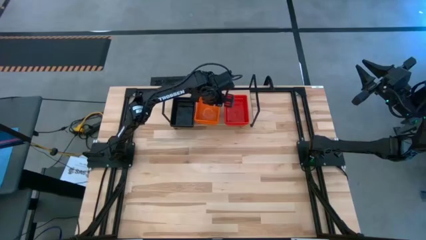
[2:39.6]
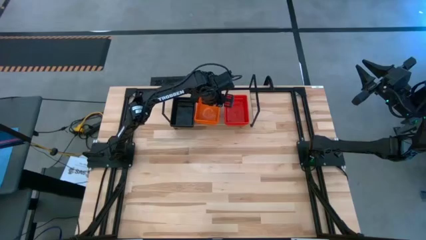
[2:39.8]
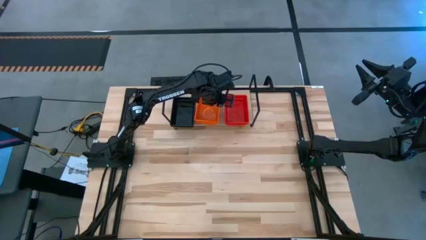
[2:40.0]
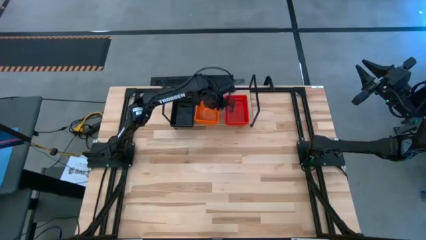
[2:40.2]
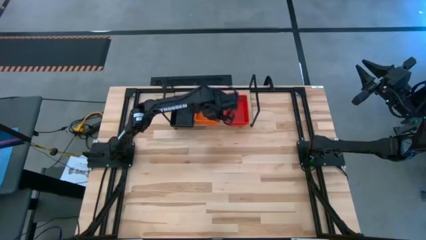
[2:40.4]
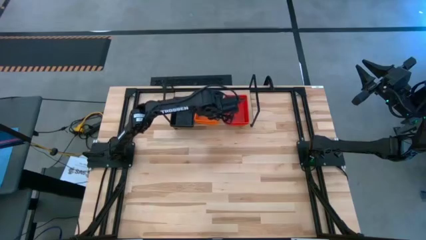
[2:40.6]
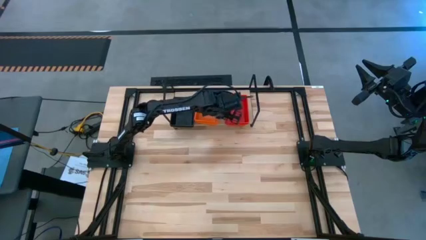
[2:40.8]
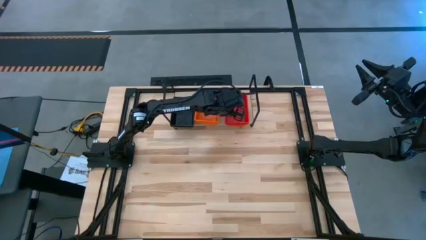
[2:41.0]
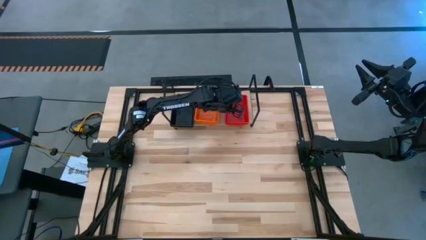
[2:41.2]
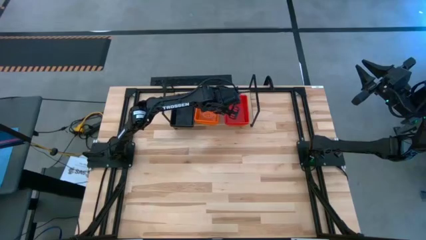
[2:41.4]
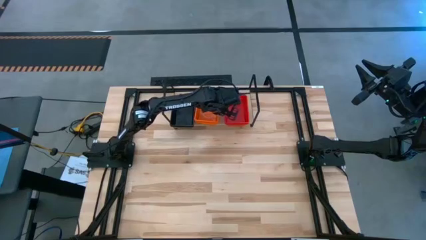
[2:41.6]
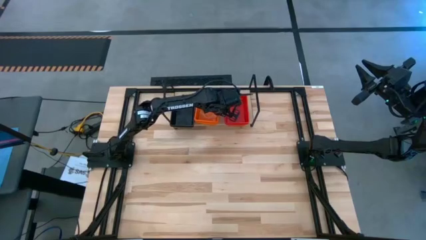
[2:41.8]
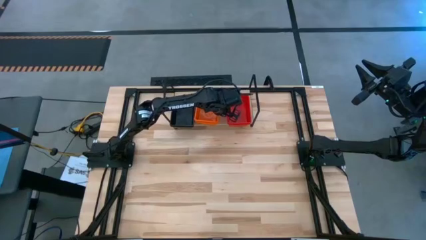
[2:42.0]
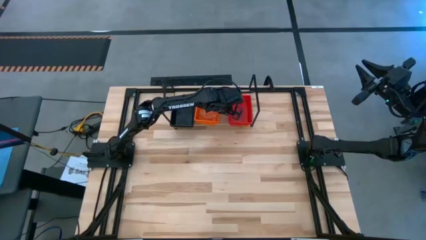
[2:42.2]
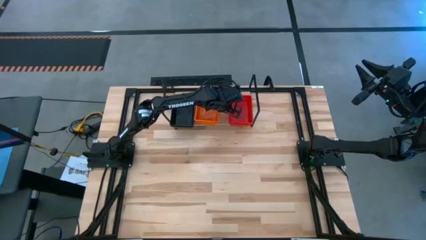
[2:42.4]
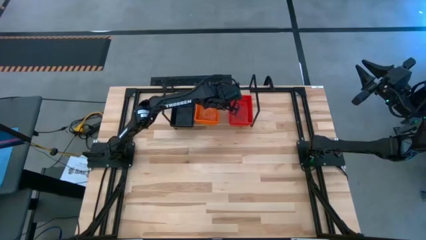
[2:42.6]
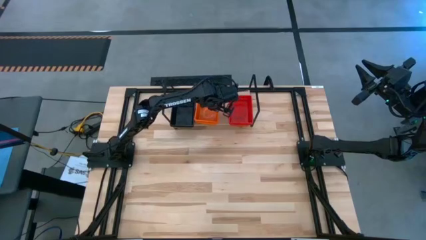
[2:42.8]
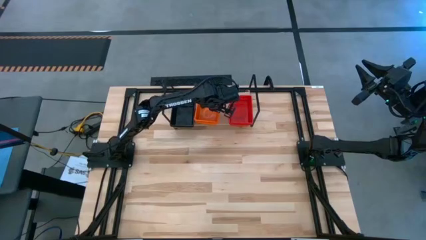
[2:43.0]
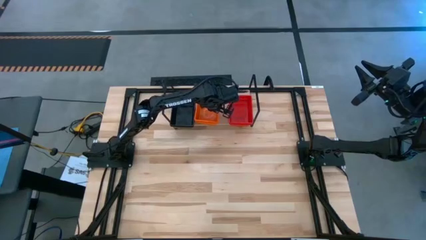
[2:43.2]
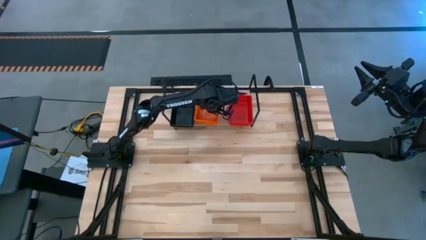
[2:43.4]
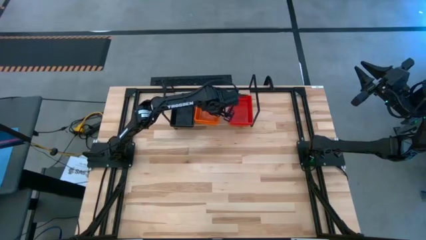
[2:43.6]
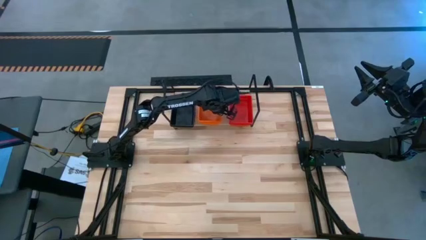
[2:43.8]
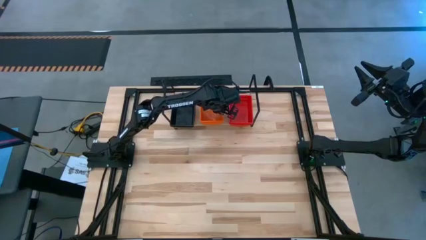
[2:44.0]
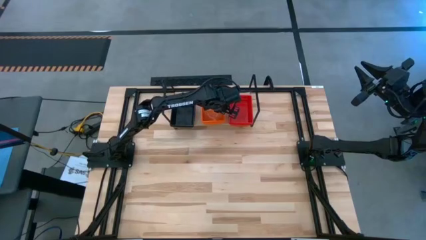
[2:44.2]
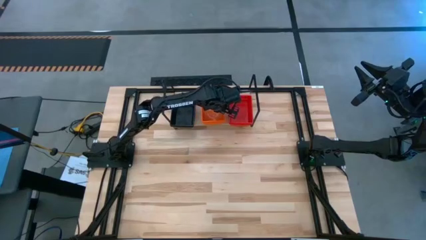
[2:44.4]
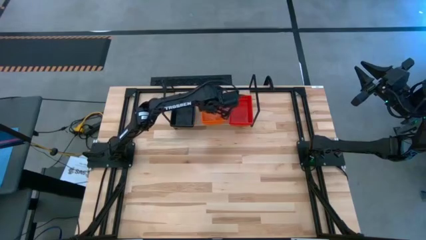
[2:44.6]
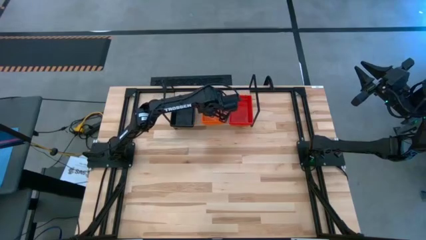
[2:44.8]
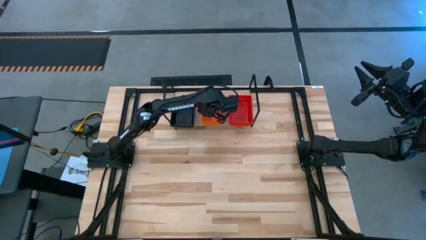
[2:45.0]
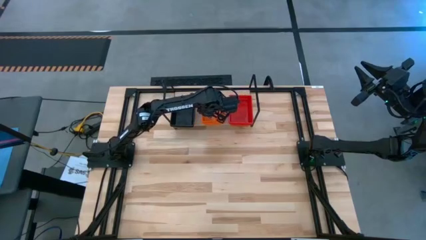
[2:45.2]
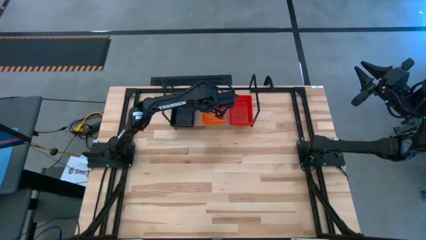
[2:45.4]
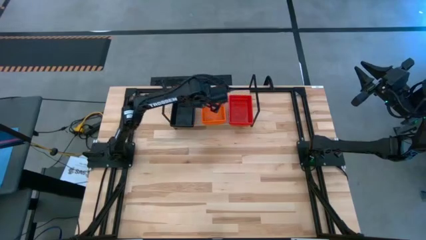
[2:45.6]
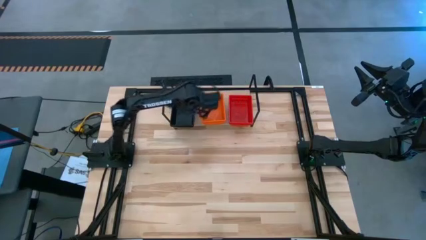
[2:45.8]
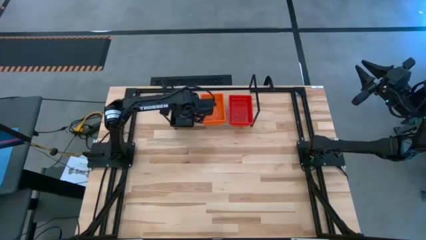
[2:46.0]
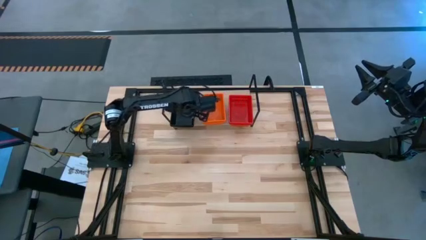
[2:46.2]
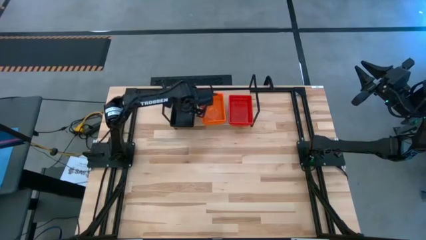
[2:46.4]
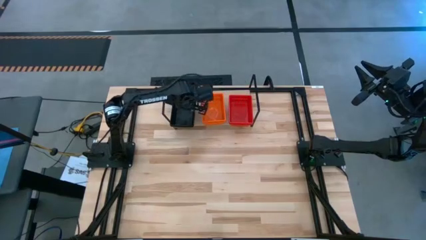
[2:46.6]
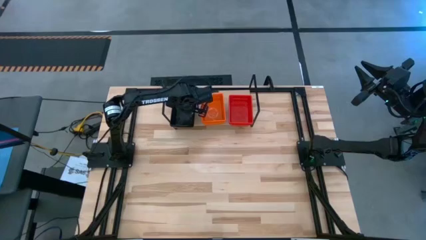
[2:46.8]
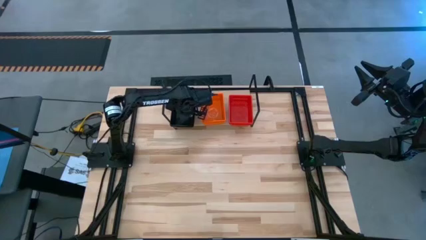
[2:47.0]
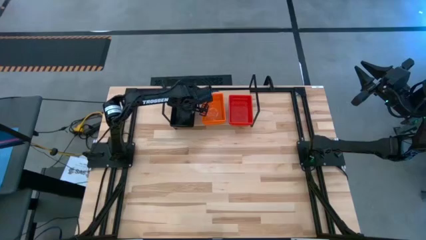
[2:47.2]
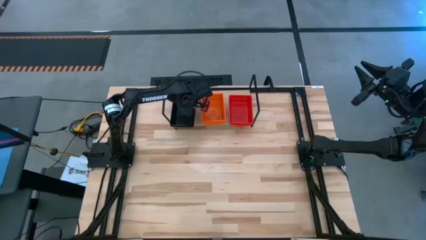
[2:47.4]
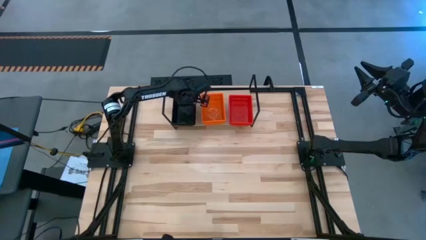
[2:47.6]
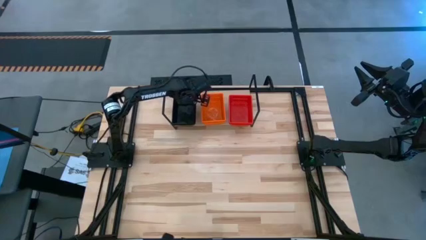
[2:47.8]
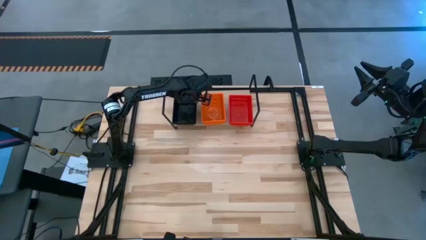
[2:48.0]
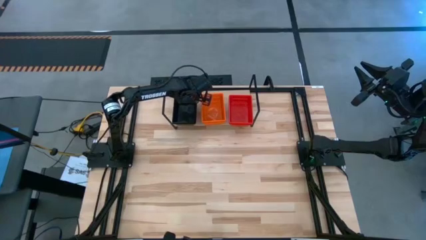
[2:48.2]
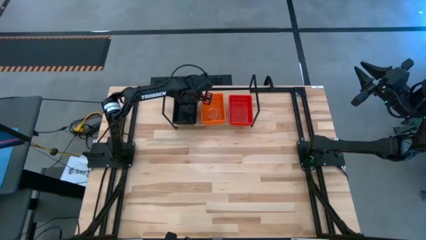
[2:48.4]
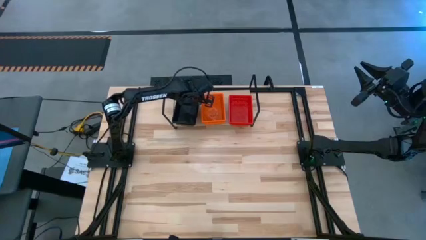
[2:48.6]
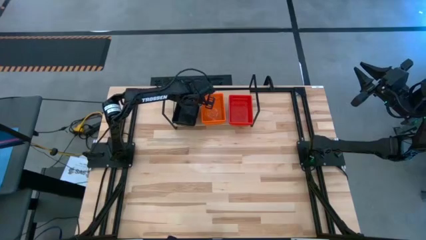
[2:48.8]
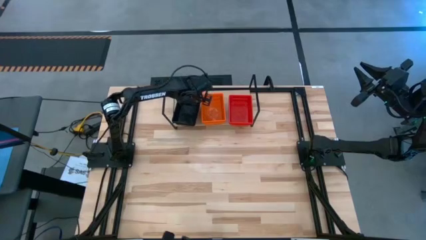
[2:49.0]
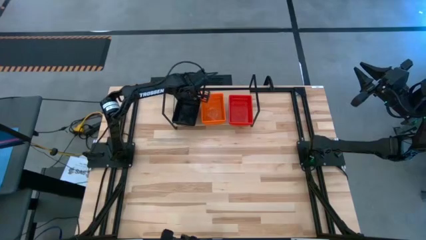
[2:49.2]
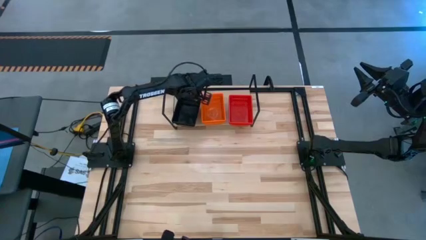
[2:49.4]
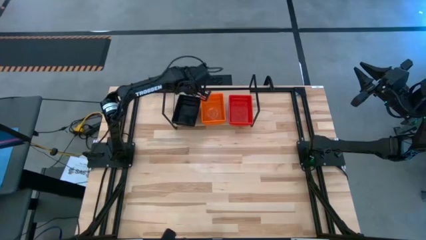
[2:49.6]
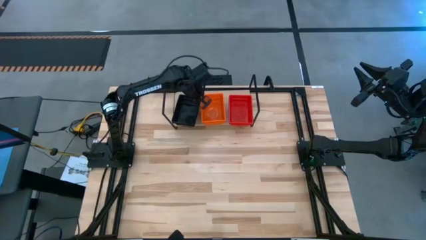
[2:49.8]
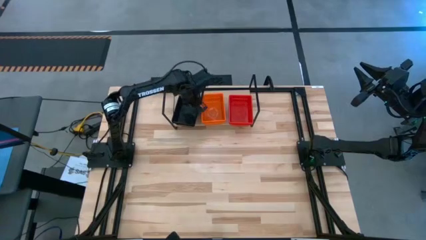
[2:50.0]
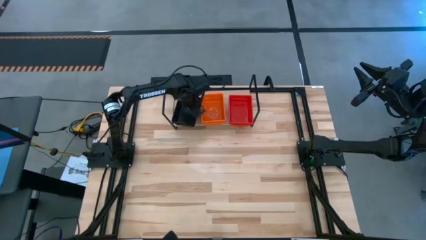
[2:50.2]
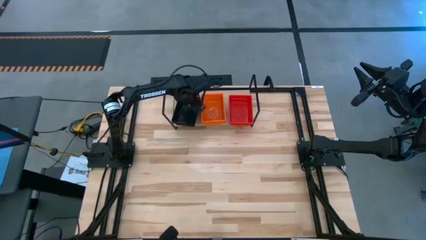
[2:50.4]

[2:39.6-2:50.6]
Task: Stack baskets on shelf by color
Adjust all the stacked bins on the shelf
